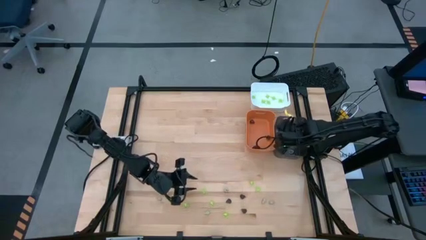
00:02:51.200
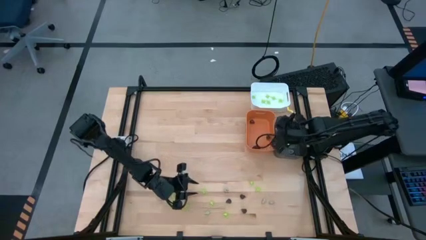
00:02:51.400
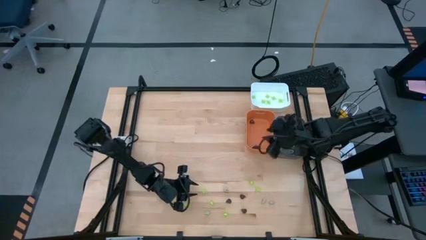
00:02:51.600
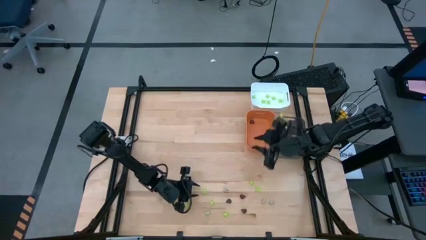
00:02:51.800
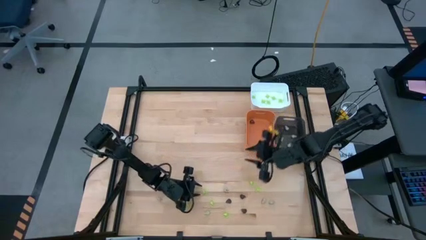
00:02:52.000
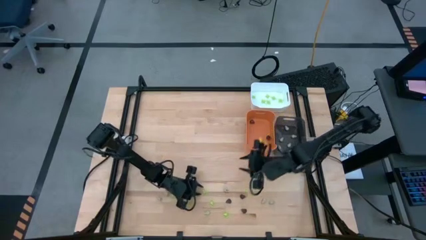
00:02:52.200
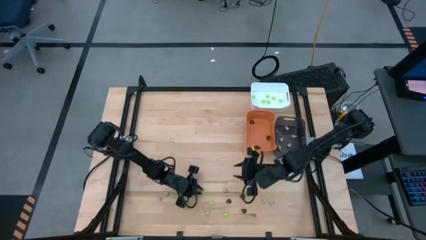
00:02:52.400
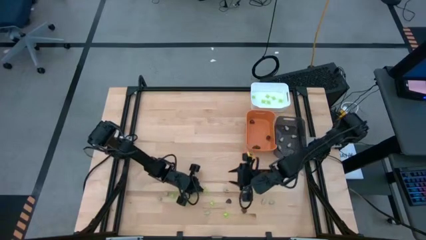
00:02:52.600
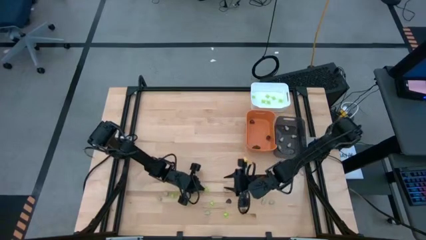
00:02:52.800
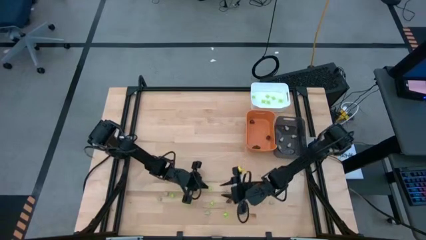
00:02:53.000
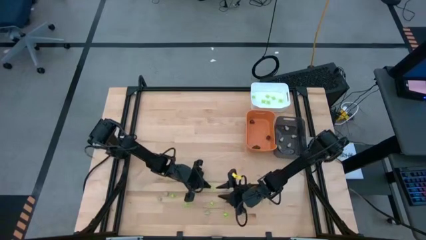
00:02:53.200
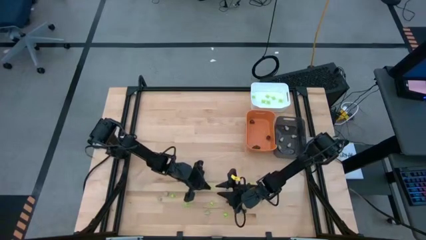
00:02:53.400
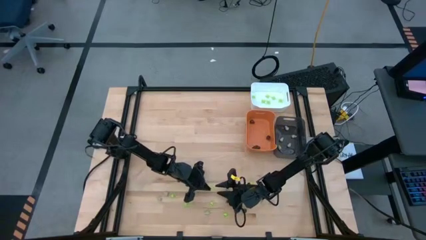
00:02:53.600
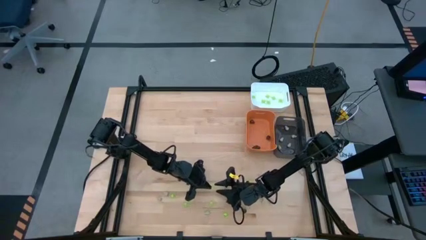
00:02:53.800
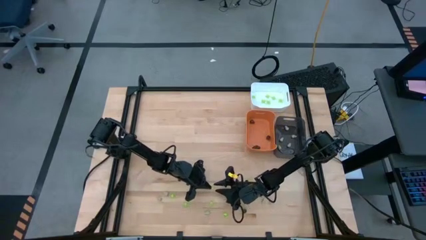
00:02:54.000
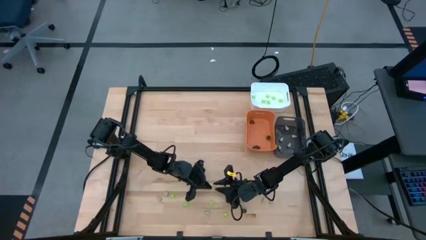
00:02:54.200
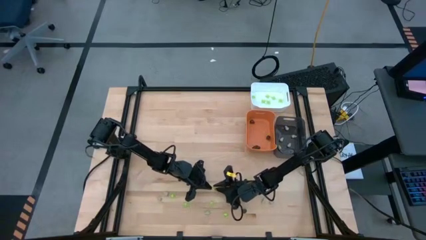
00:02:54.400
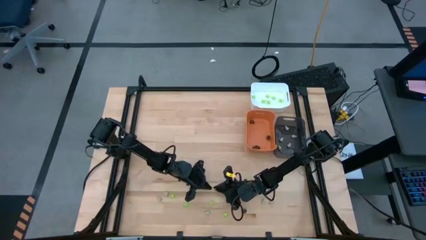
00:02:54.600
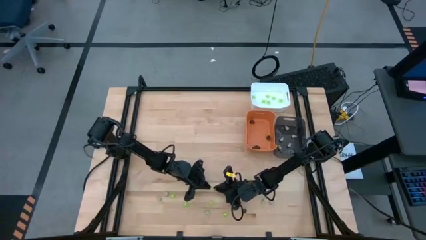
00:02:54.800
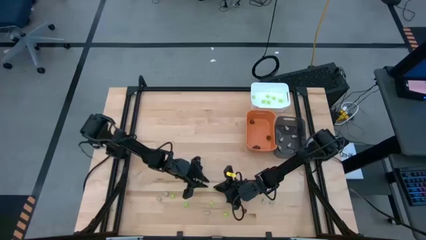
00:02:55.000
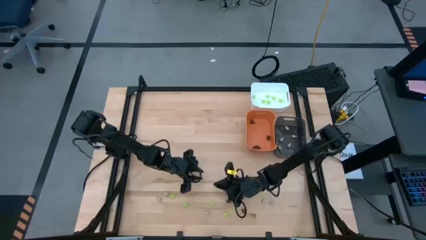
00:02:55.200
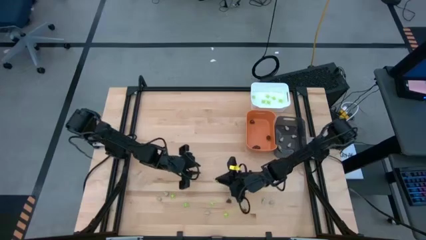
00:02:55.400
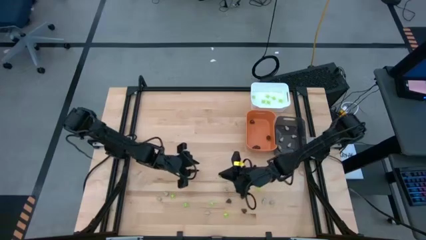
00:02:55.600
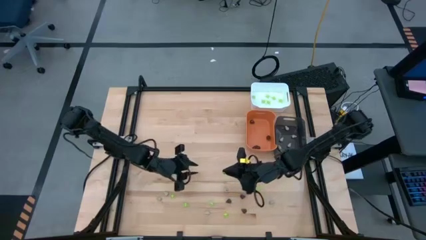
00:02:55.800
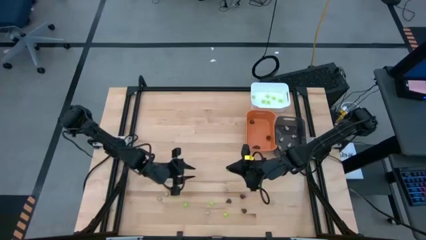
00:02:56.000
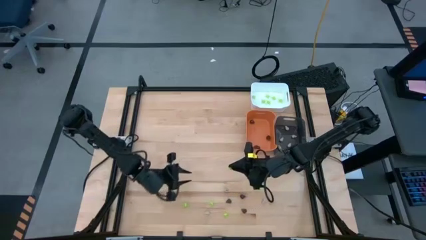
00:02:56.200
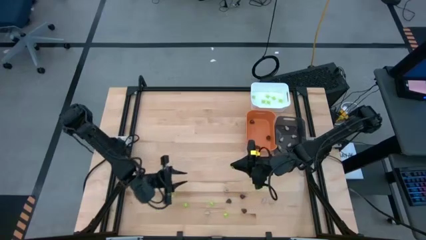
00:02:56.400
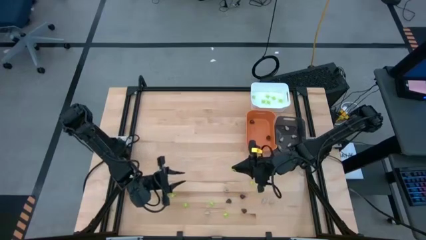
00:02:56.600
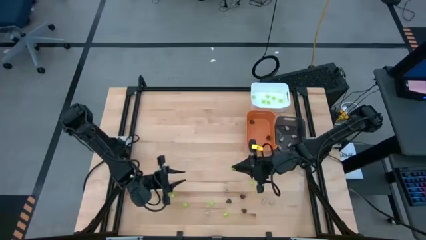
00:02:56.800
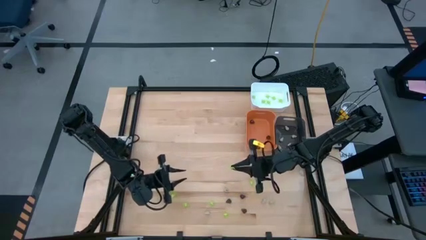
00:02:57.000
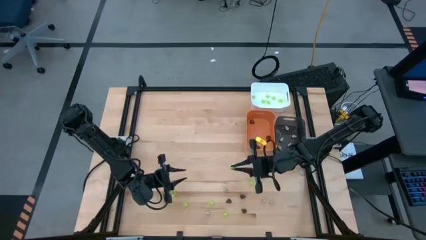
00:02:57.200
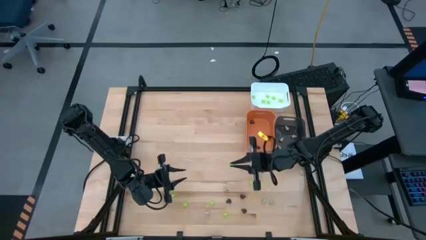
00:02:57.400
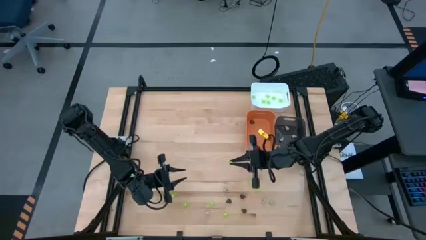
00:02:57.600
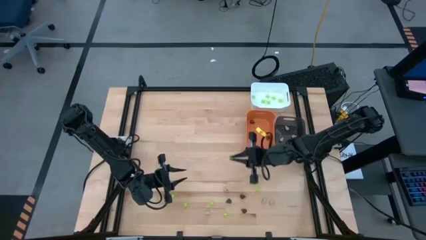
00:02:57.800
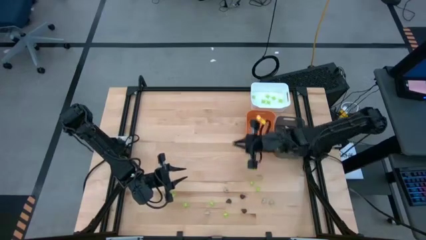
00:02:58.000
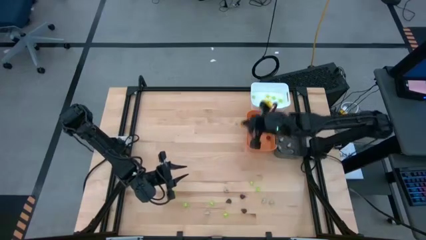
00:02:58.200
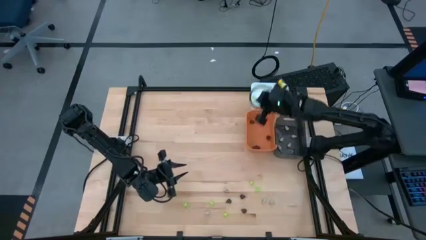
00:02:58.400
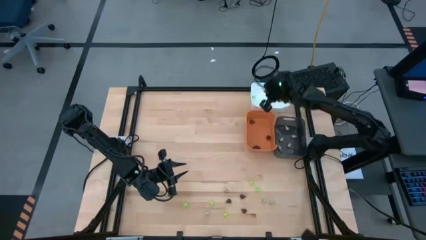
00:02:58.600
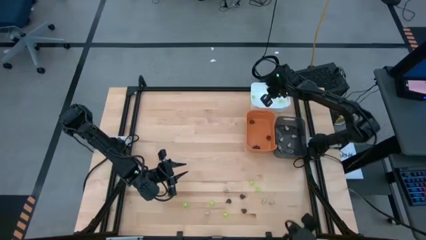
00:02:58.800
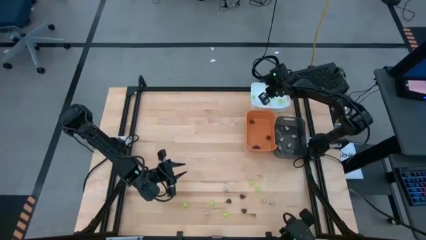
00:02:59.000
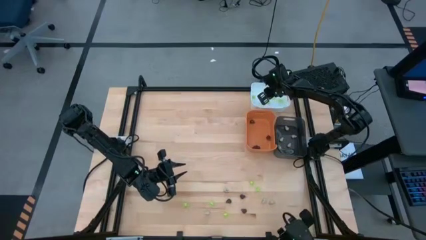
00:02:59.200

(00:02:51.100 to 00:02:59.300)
Task: Sort Halloween decoration
Put the green spider toy into the white bin

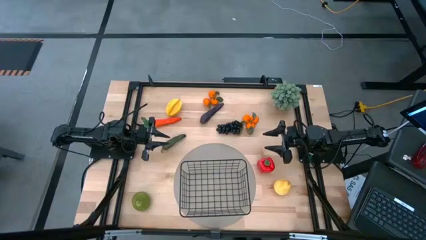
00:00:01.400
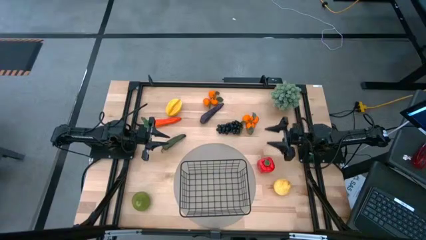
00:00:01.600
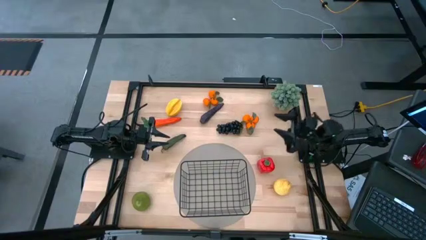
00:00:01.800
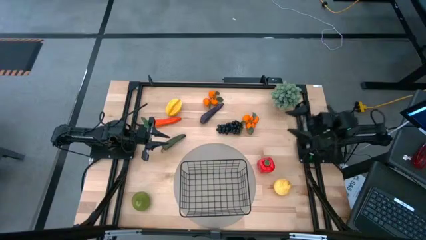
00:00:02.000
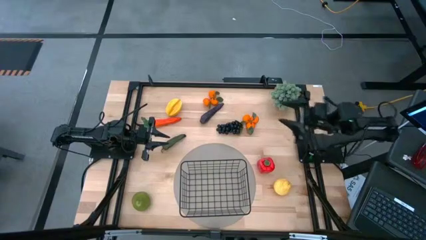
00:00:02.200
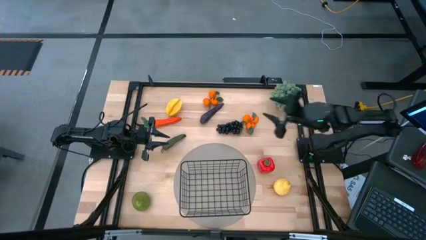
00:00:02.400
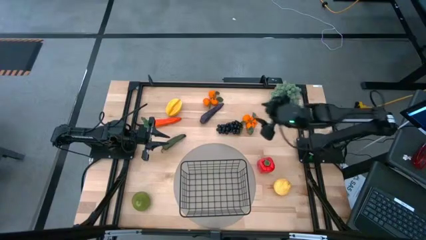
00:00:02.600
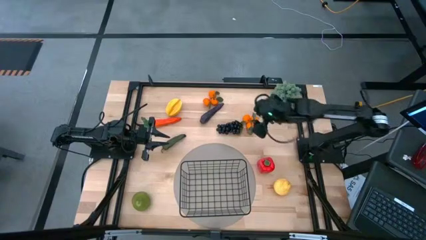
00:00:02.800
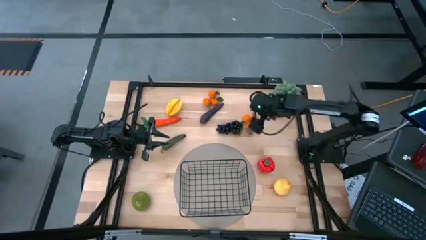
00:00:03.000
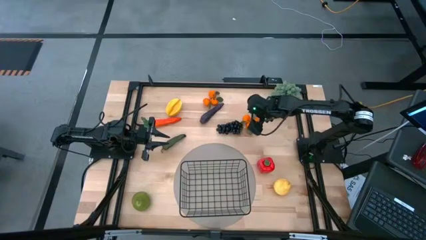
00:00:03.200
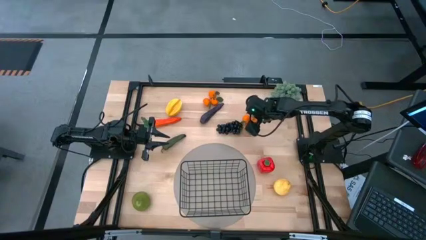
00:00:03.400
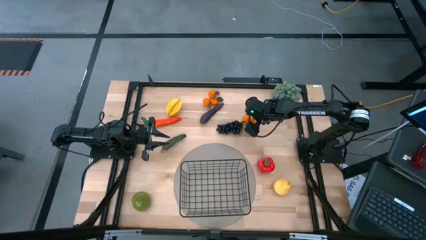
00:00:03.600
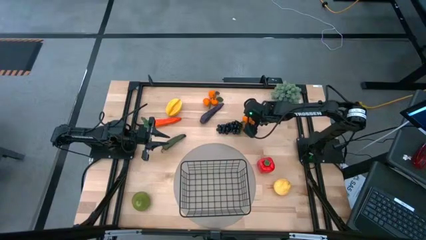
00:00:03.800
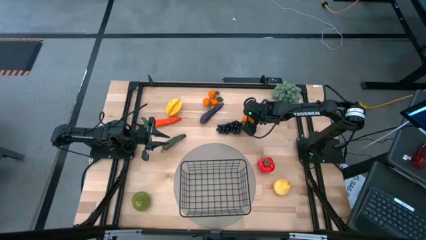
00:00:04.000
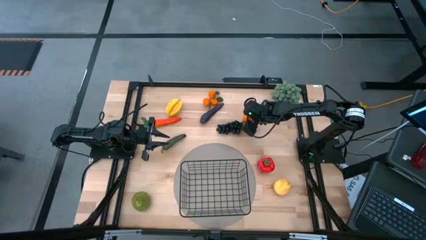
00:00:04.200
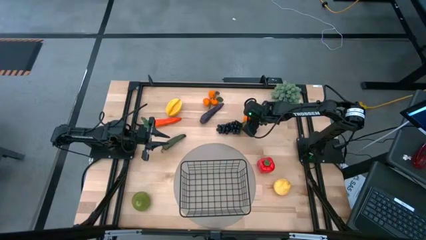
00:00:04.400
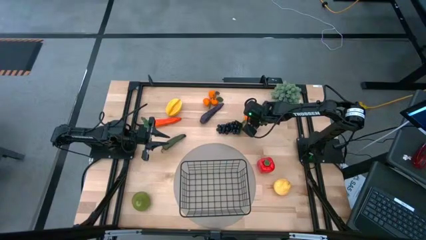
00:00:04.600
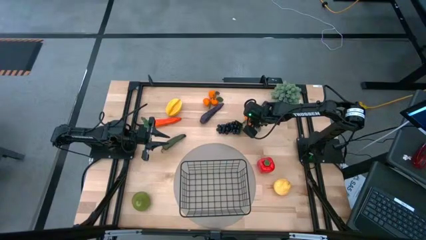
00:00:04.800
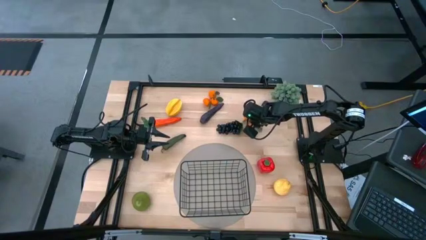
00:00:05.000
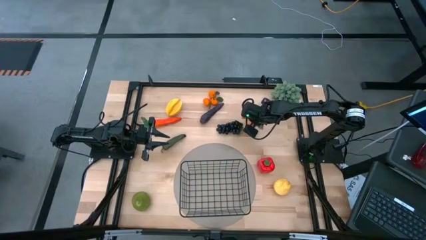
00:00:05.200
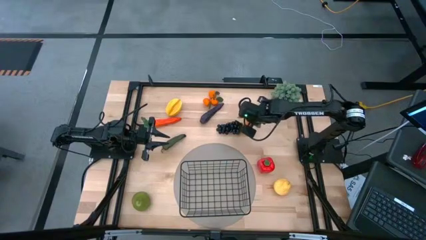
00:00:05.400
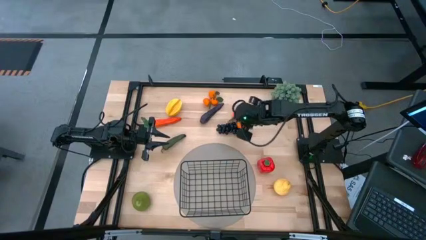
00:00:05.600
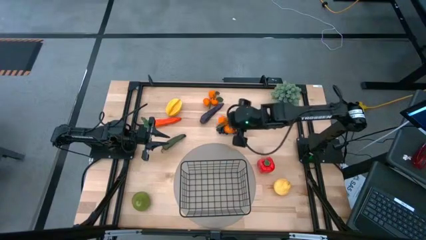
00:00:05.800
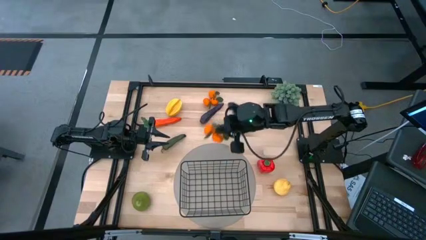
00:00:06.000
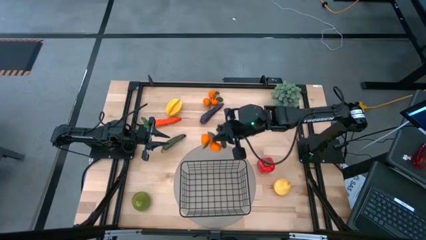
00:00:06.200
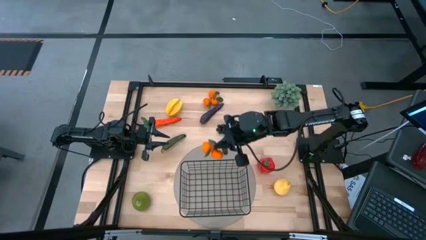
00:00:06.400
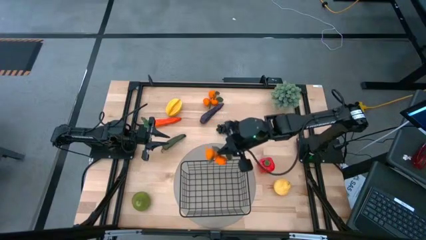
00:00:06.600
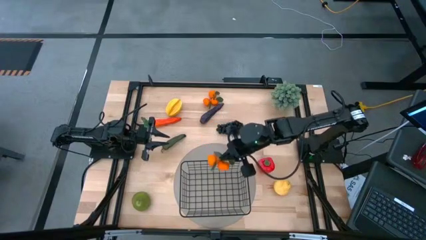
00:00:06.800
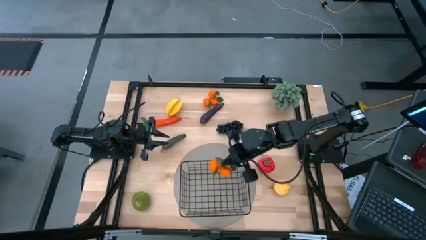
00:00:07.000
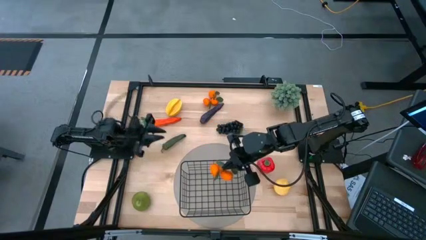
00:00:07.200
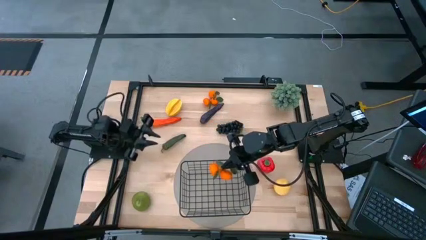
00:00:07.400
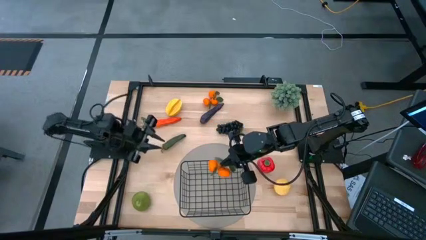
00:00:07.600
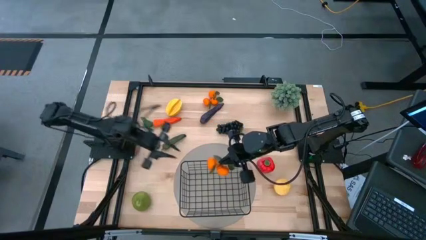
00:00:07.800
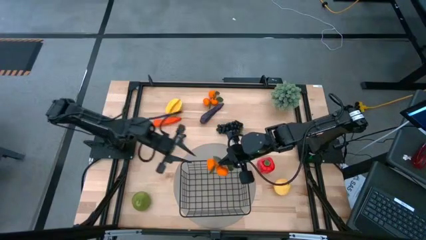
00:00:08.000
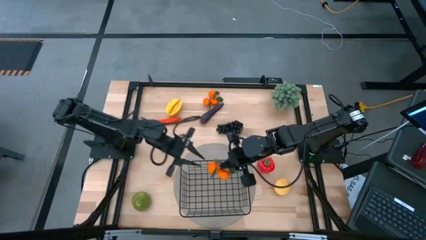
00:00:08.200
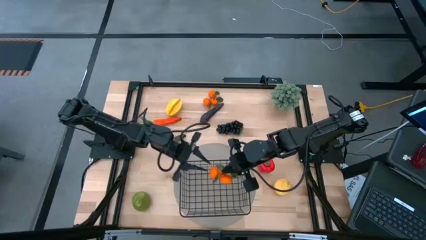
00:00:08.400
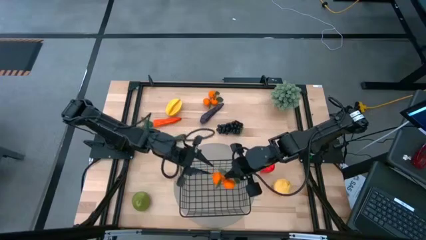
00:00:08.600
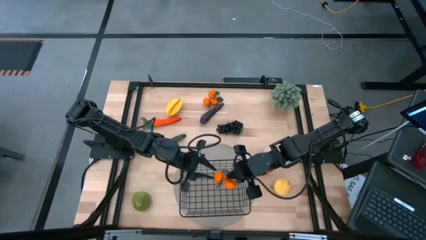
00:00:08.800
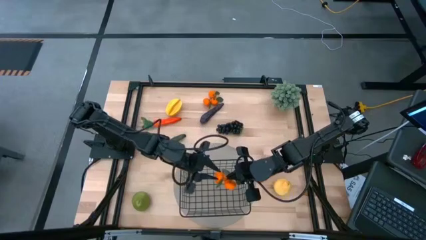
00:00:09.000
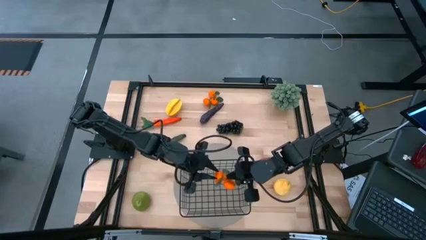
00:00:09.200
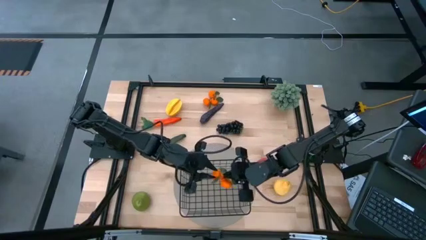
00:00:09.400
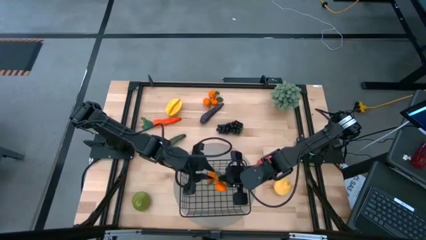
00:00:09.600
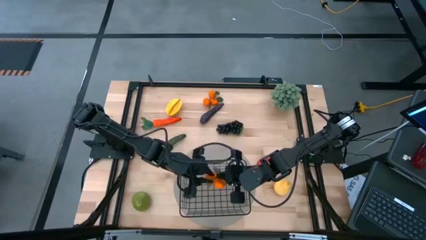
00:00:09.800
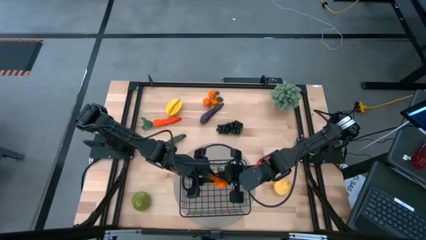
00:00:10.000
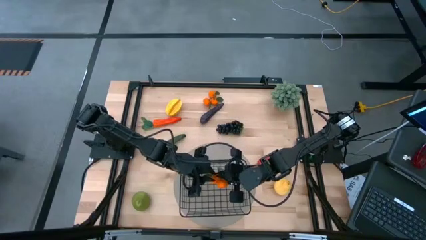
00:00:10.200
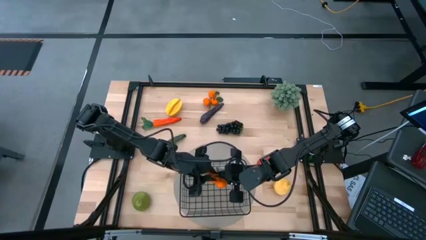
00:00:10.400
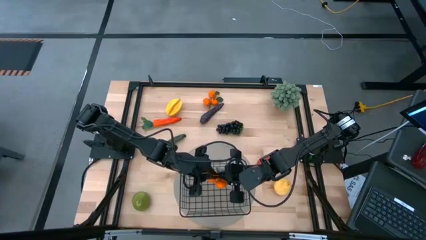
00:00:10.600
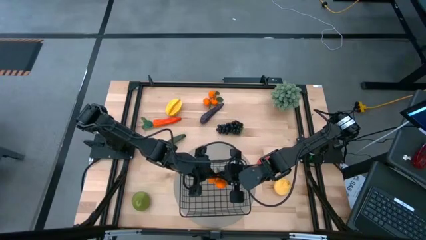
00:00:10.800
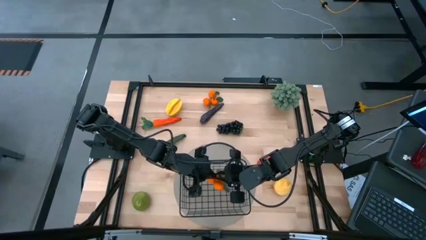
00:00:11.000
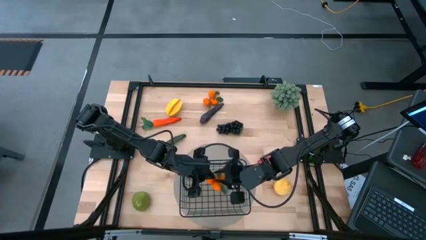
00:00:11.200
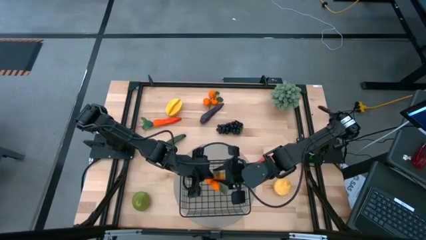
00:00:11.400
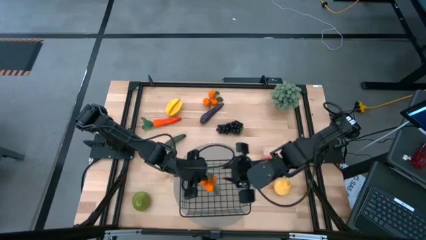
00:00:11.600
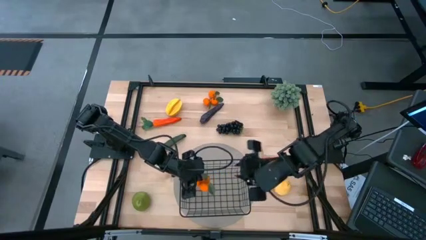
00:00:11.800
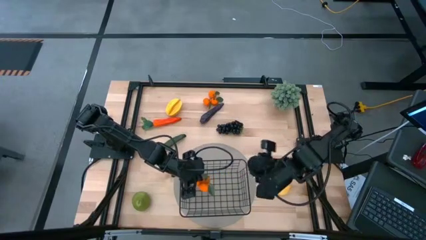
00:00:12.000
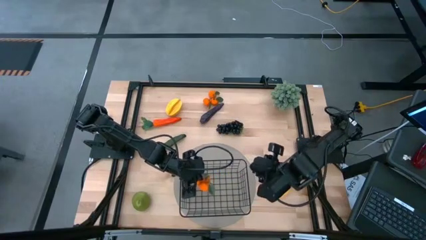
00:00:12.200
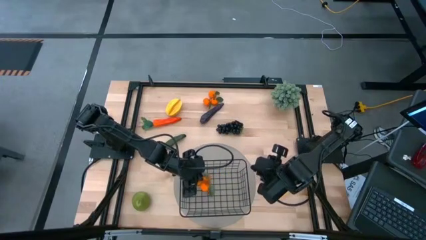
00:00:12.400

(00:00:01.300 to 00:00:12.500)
Task: Build produce basket
Put the bottom tangerines into the black wire basket
